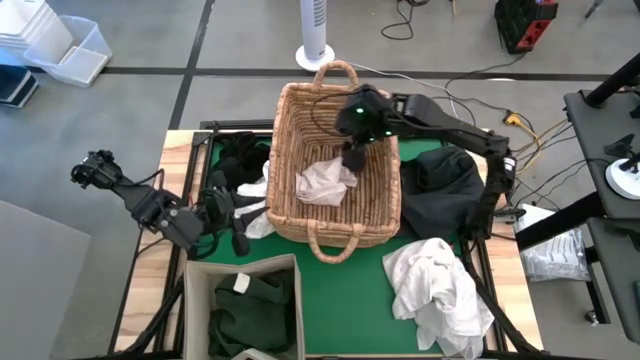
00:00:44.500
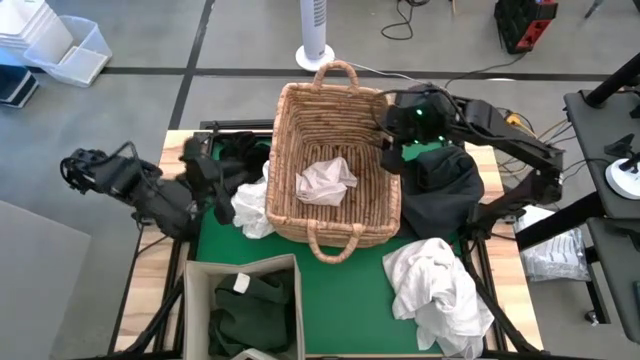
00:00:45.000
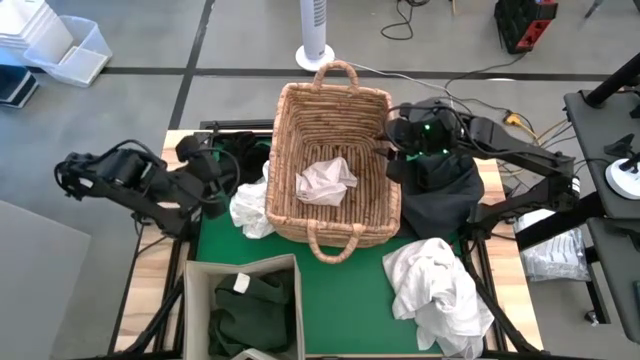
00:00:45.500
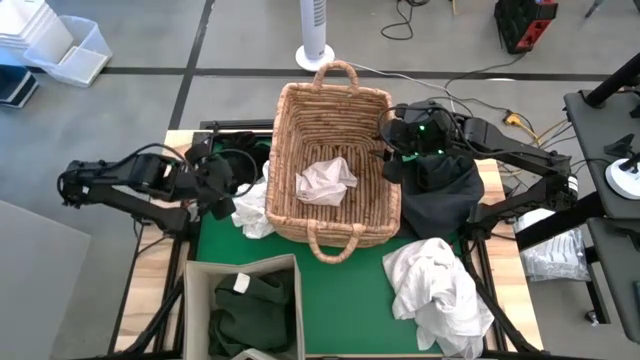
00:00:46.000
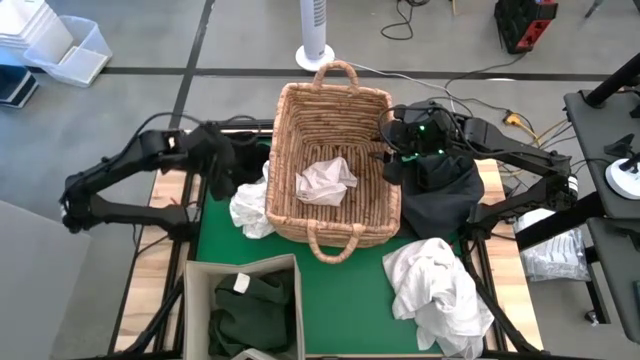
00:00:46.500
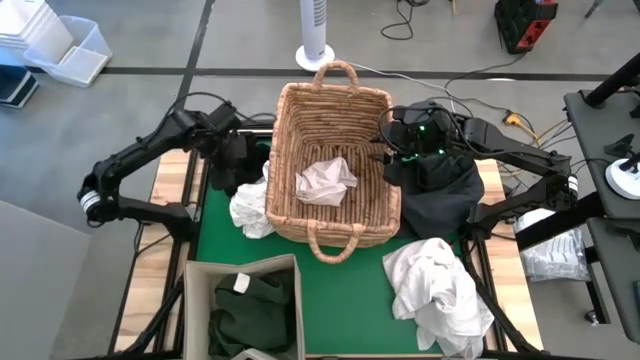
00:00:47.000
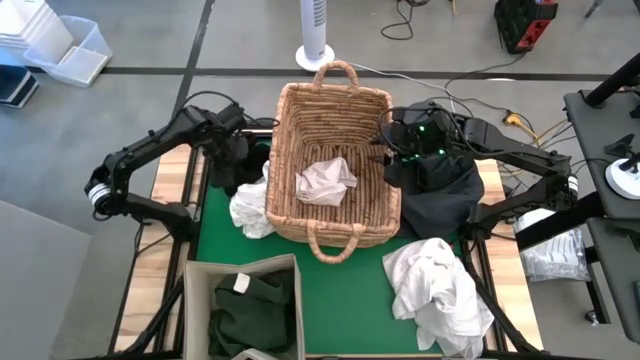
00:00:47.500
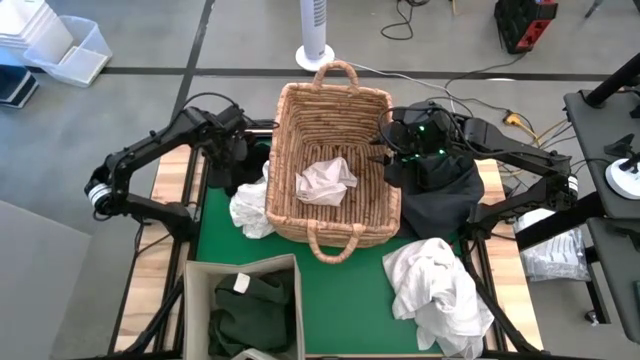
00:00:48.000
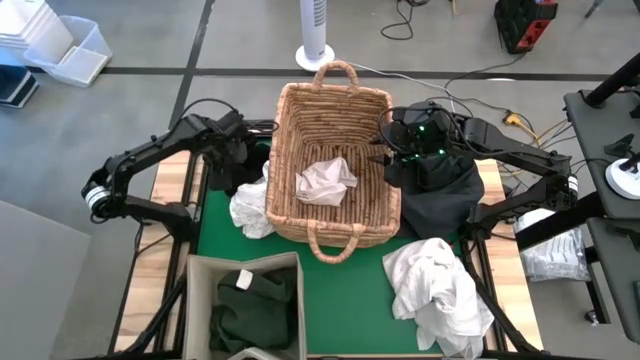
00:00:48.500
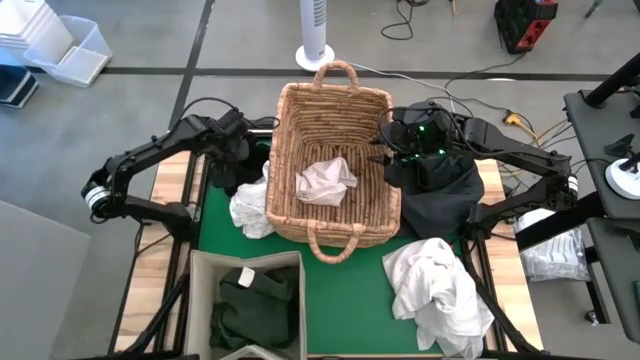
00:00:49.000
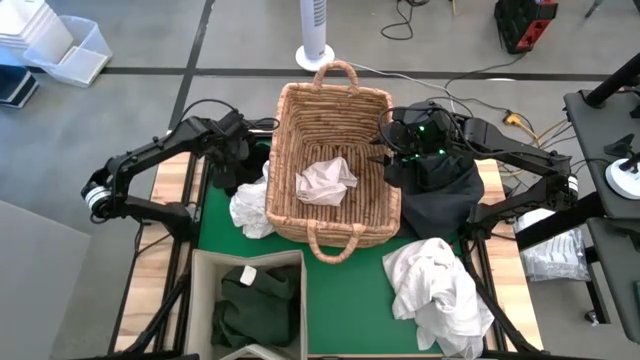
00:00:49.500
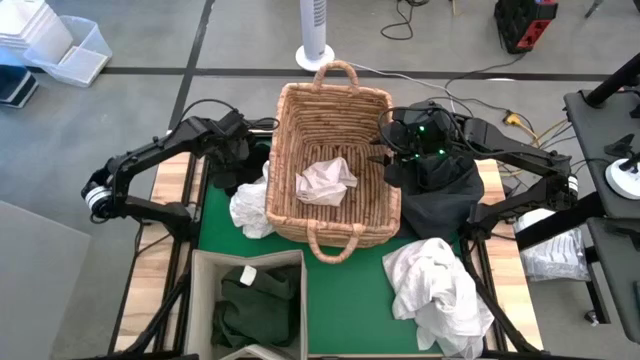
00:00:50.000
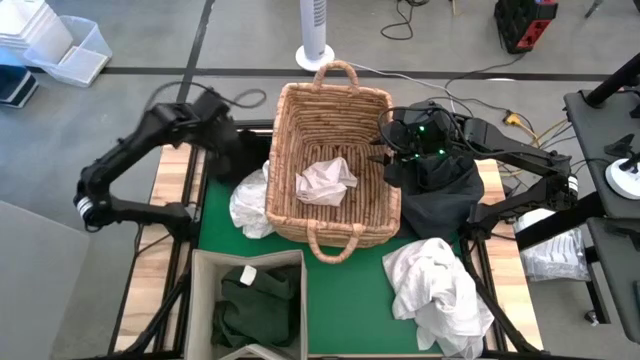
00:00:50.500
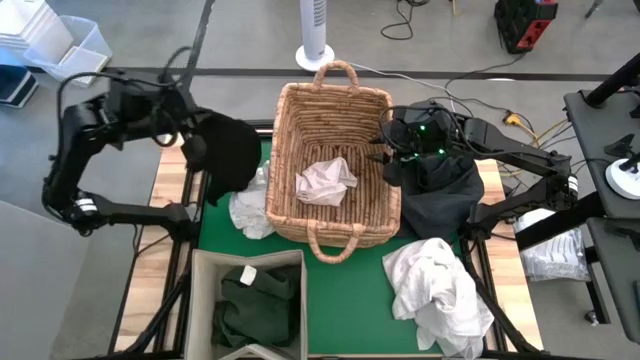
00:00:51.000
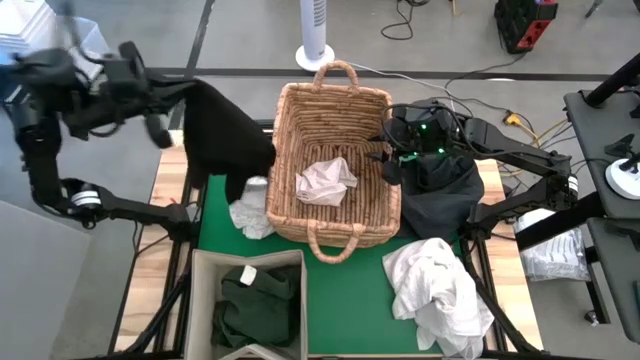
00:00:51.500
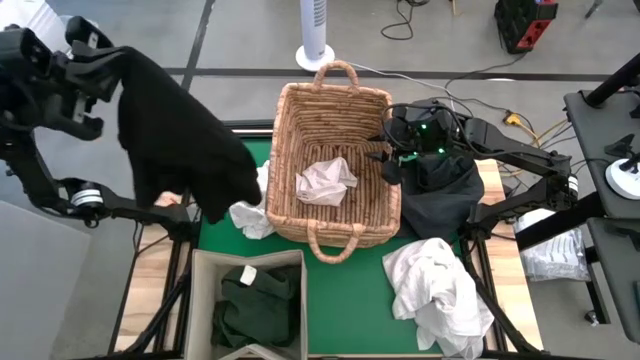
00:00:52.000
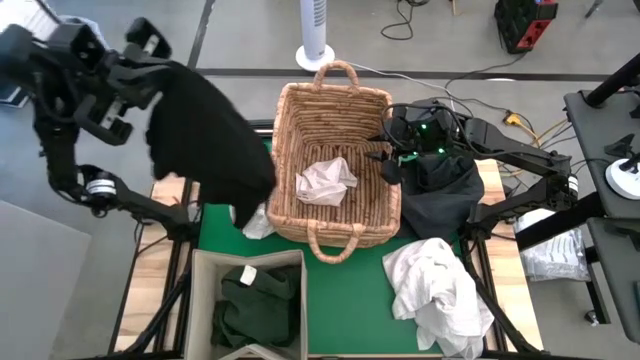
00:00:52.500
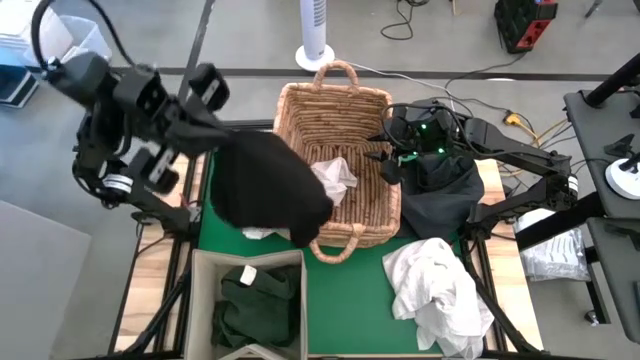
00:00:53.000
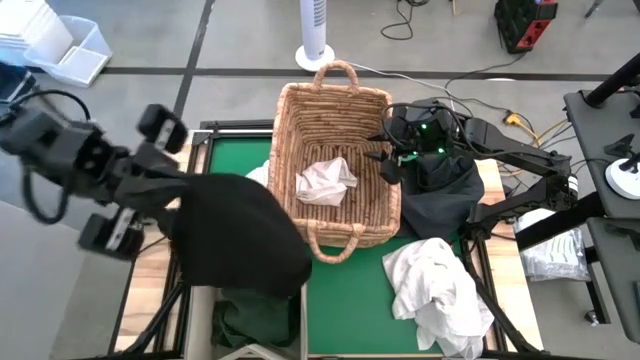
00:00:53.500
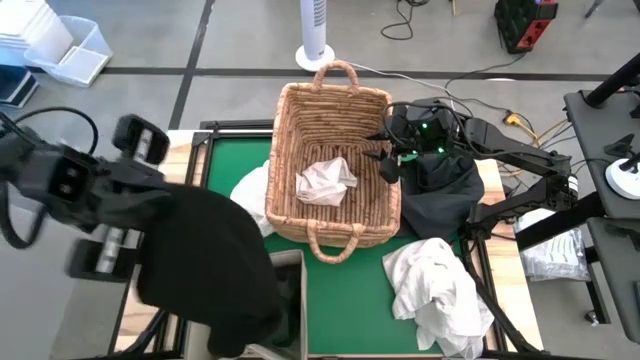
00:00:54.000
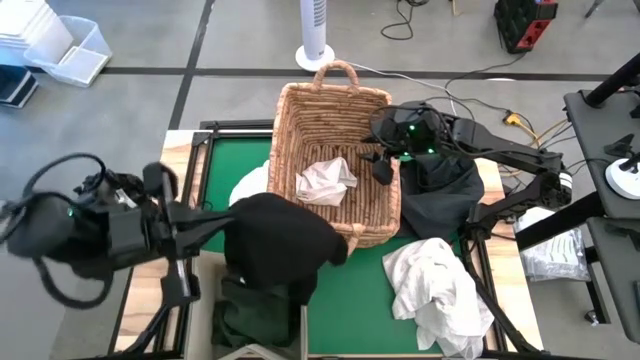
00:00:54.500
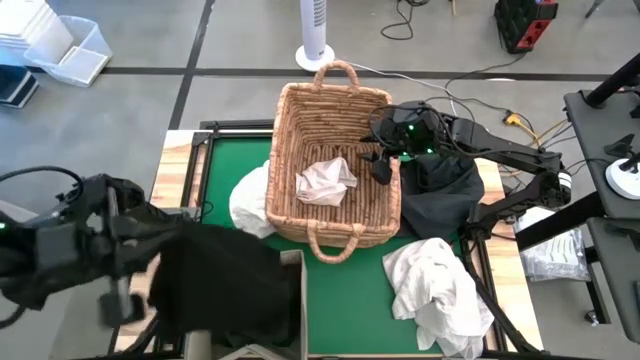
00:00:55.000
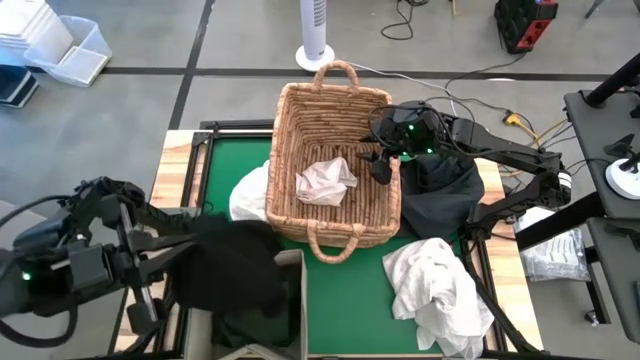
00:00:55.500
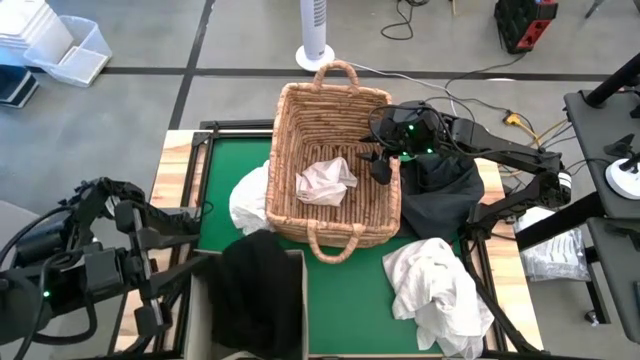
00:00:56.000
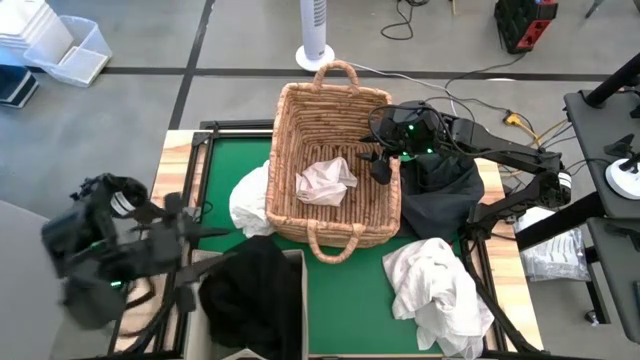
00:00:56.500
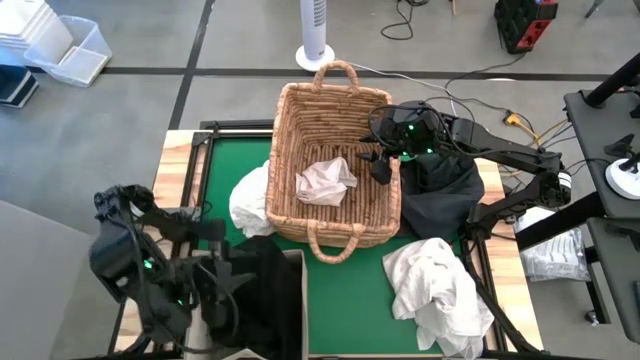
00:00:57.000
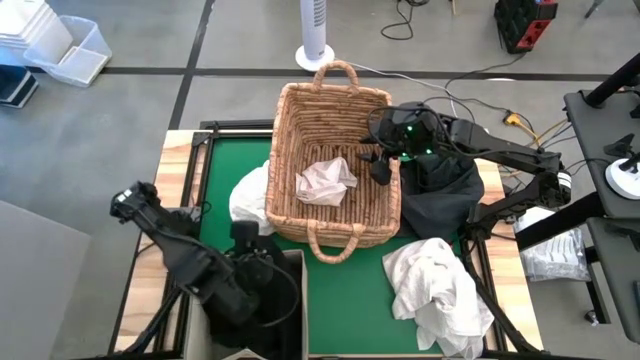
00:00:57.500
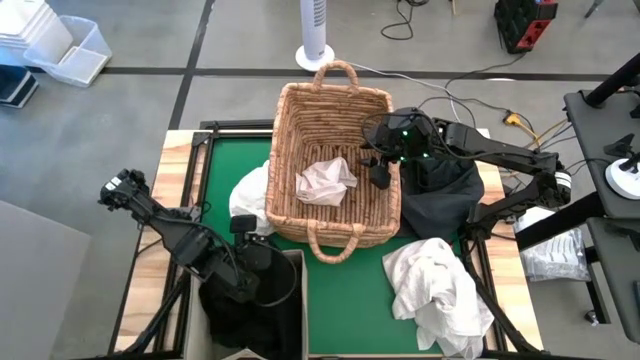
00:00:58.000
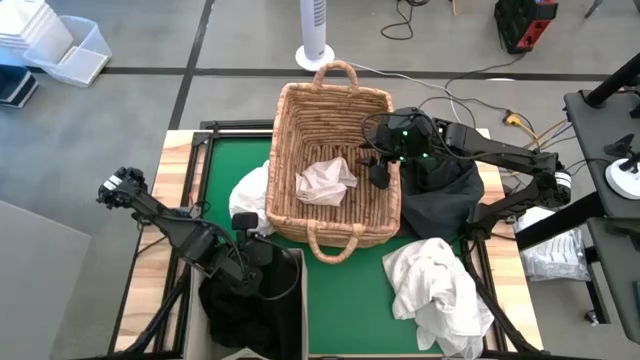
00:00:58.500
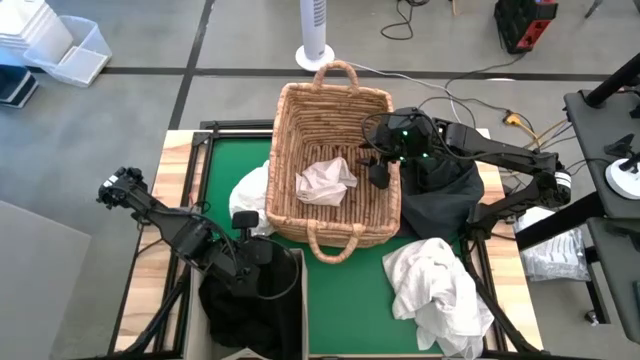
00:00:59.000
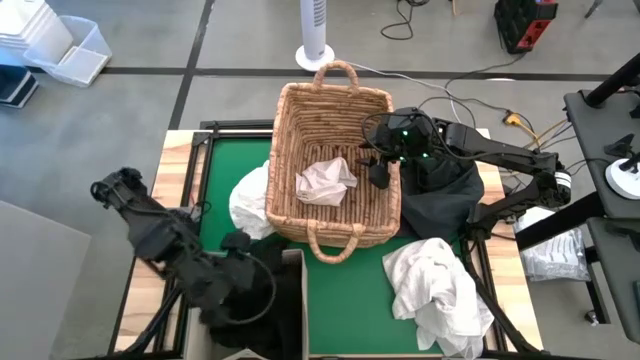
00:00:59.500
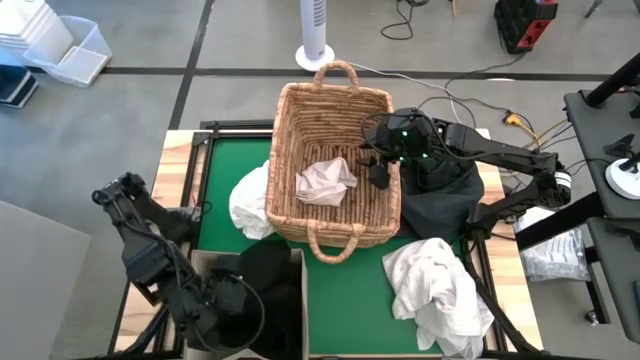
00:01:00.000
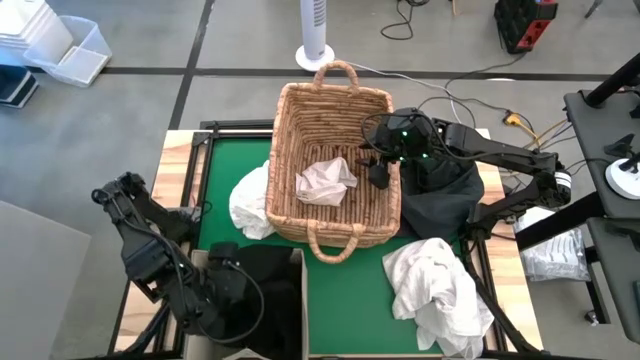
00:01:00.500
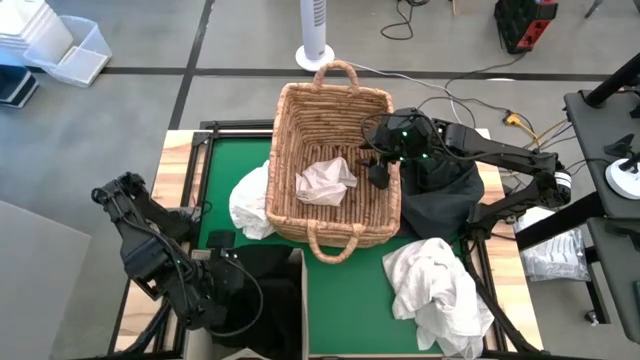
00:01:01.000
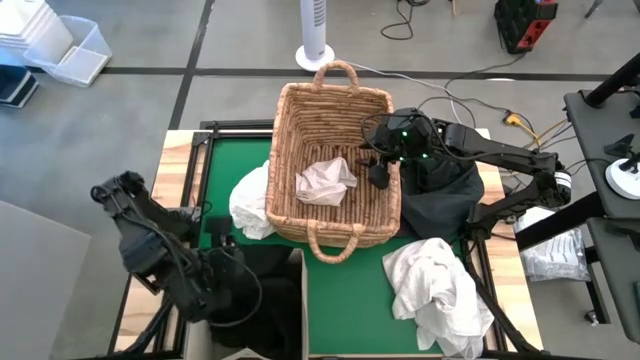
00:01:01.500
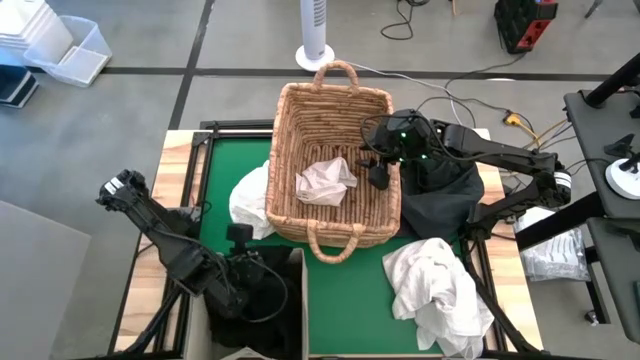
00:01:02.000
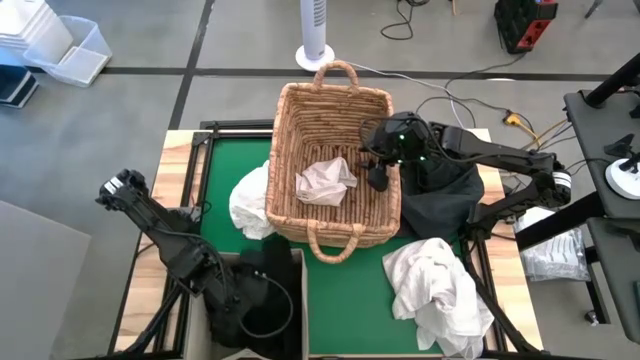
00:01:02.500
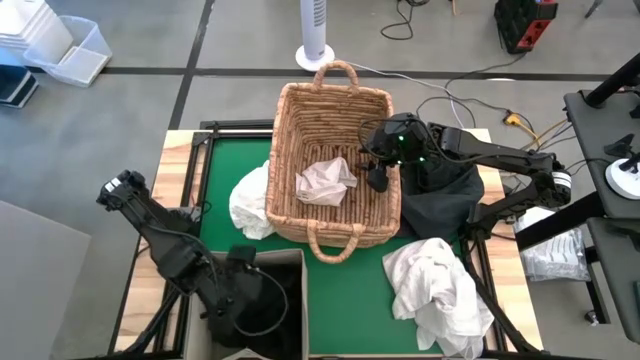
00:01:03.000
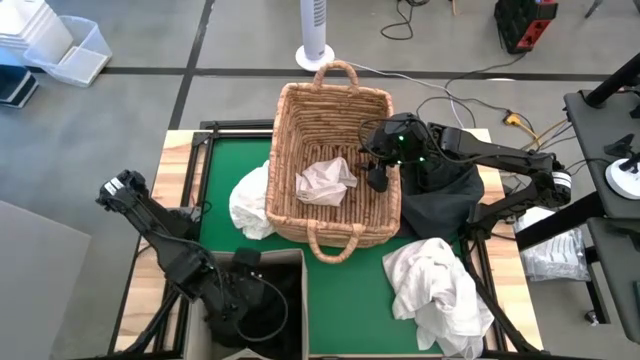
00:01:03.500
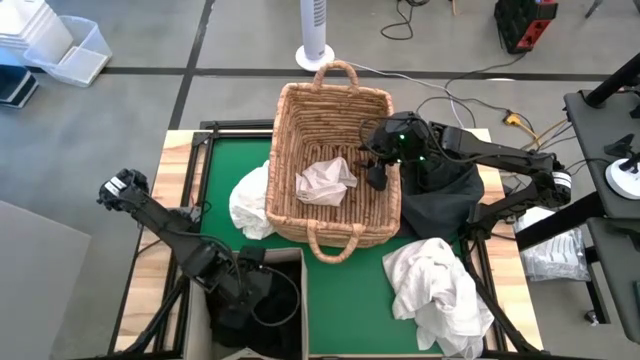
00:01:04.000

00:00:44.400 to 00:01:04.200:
Put the left black shirt into the gray laundry bin
